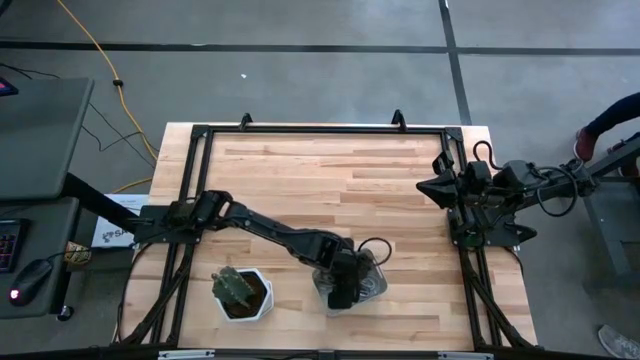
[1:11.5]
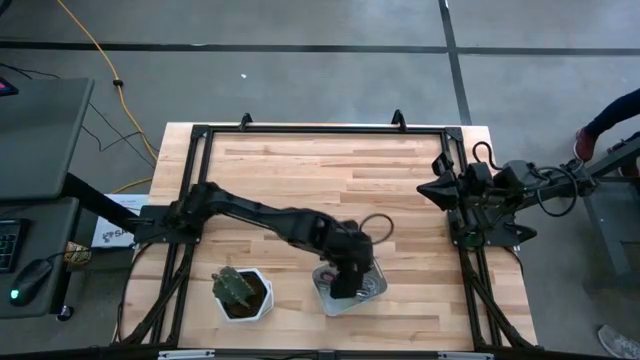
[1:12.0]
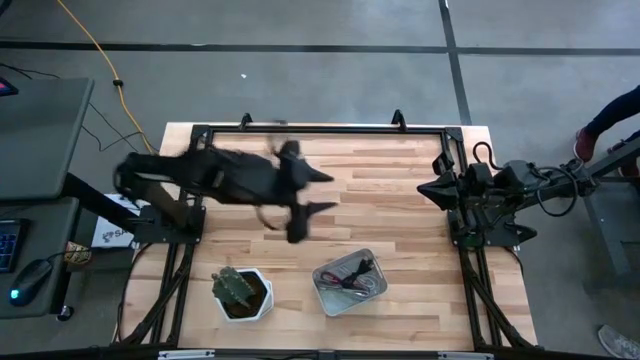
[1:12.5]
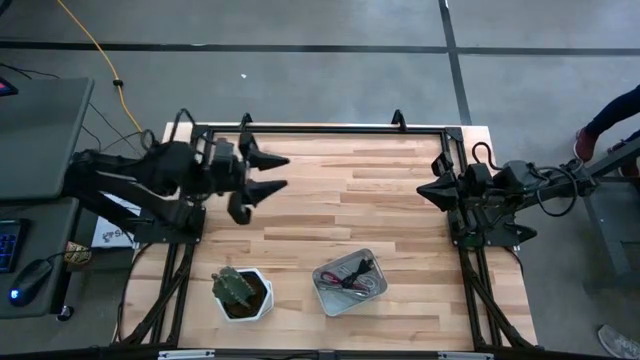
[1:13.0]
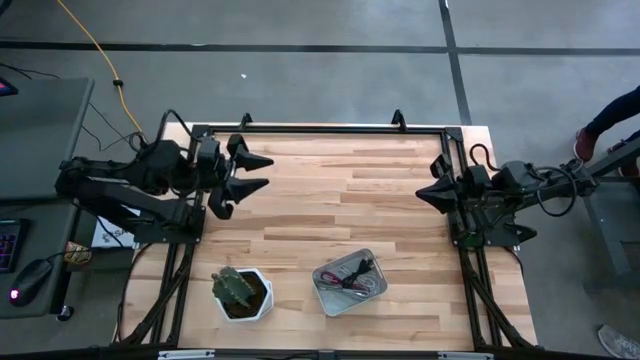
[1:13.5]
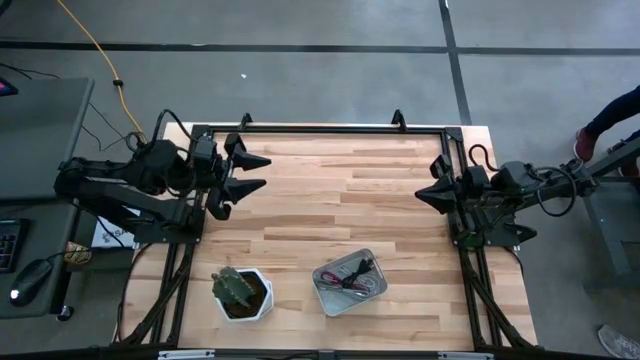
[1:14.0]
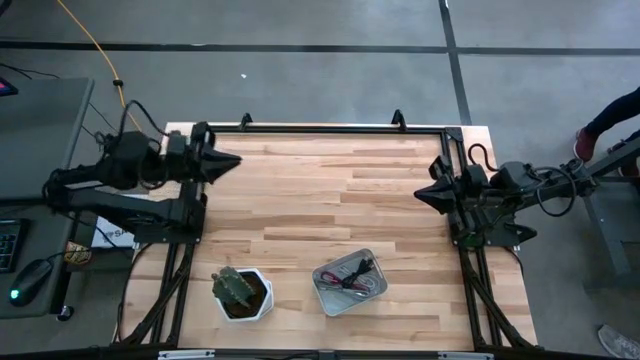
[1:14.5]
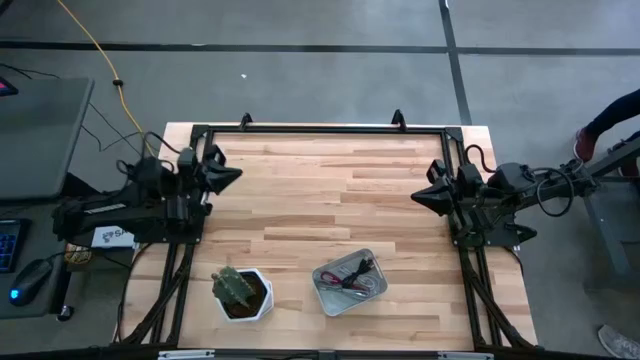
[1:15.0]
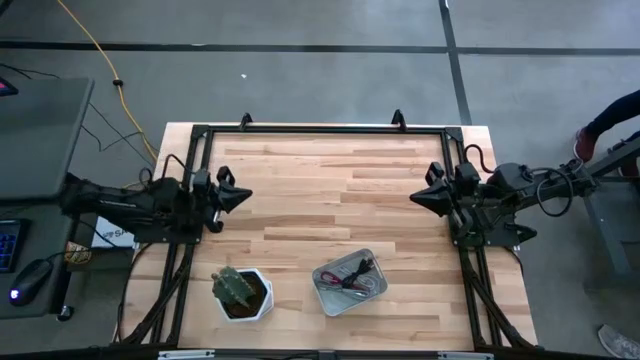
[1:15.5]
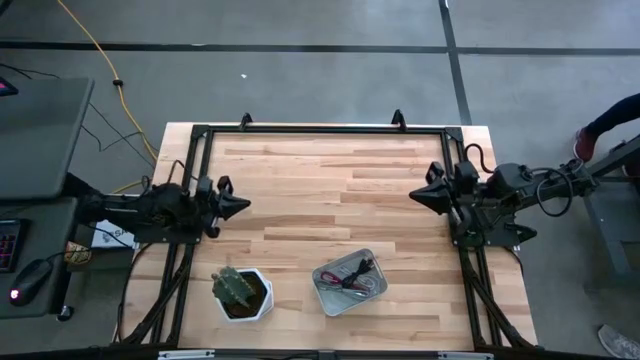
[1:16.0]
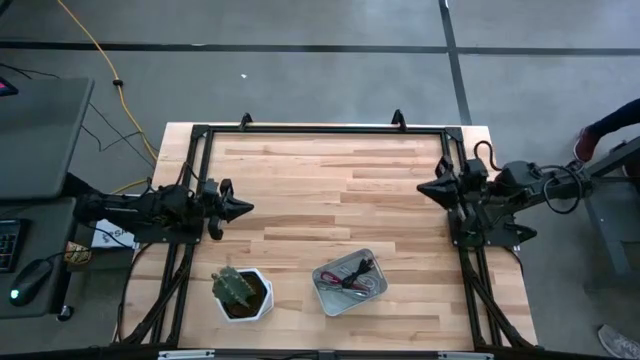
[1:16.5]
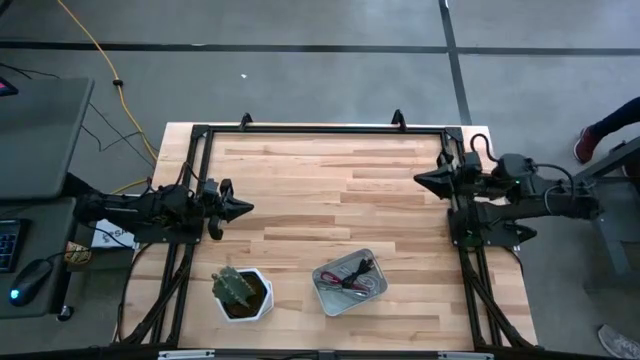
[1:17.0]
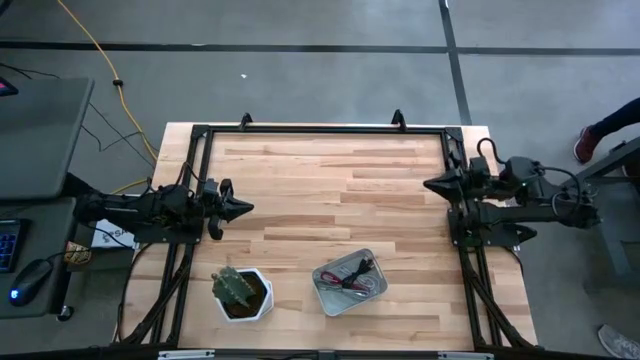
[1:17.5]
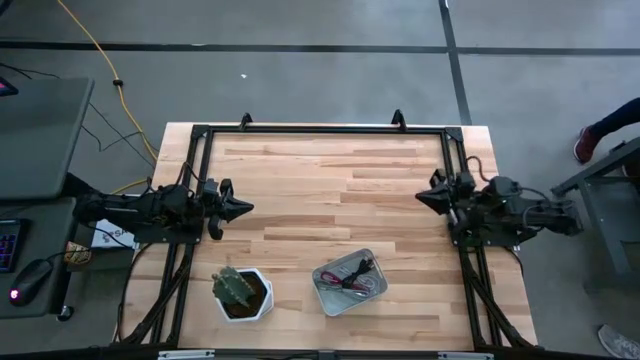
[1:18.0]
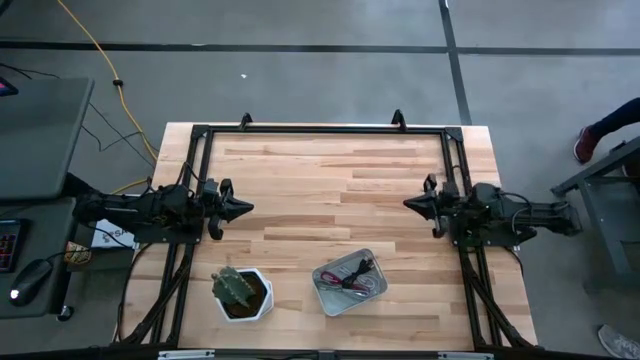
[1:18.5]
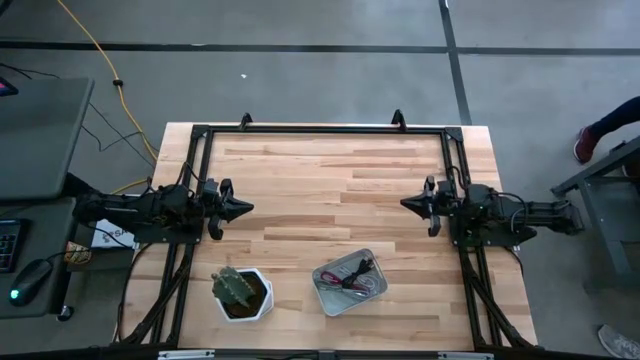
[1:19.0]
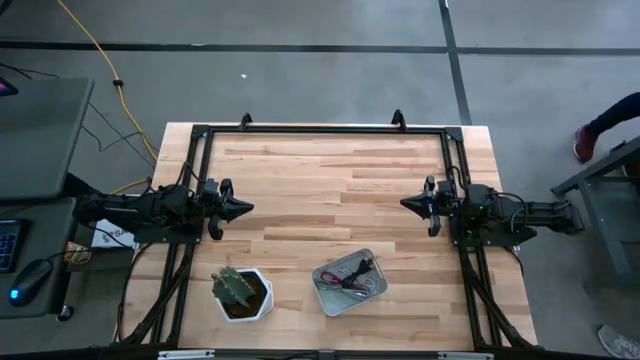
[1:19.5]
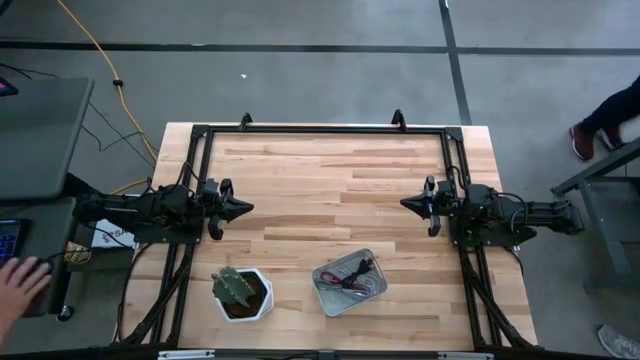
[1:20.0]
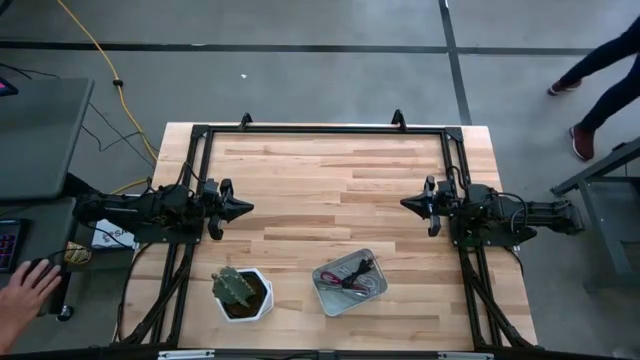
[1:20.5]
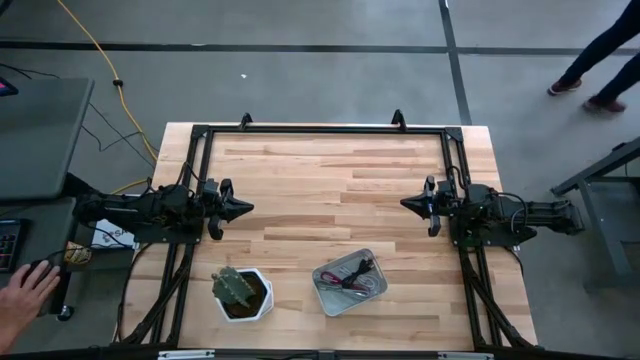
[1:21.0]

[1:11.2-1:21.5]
Task: Pick and place USB-C Cables
Return to Home Position

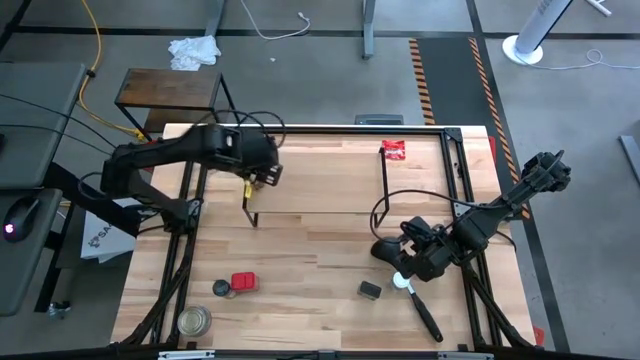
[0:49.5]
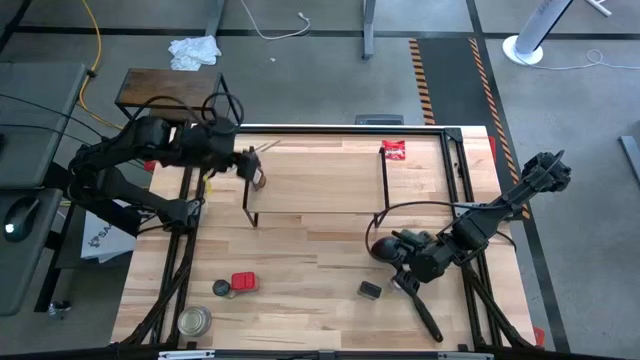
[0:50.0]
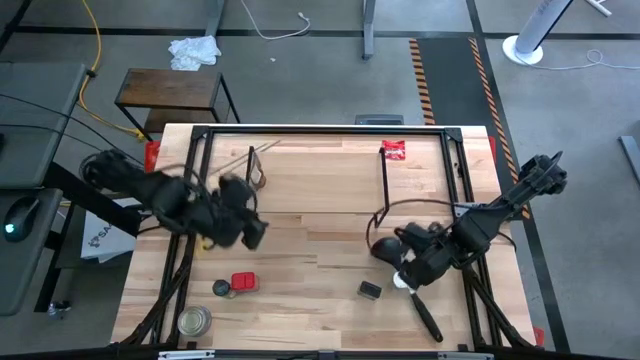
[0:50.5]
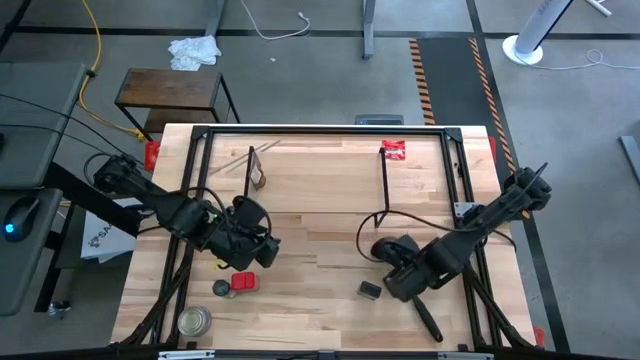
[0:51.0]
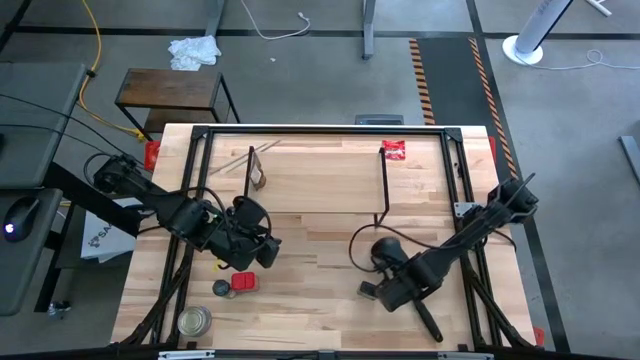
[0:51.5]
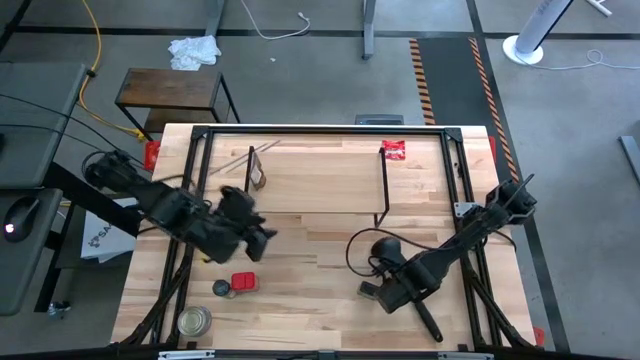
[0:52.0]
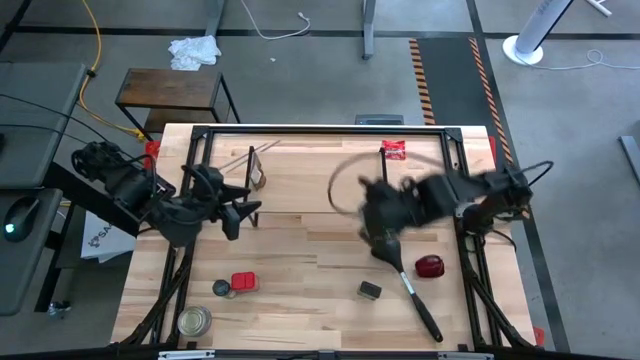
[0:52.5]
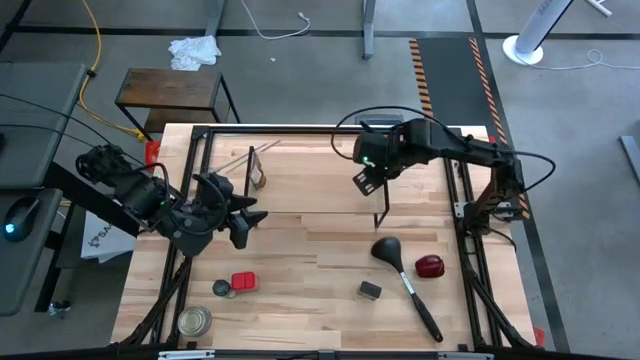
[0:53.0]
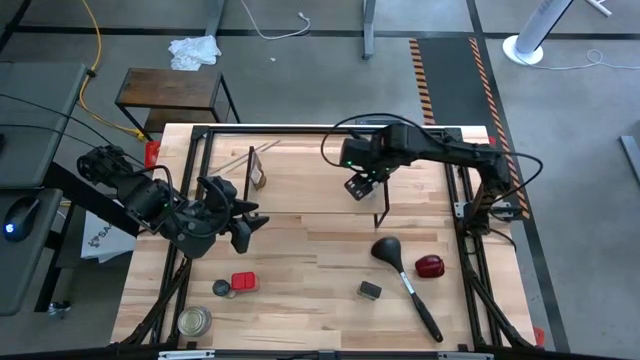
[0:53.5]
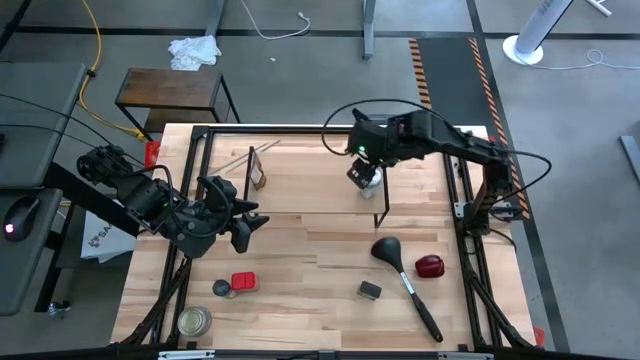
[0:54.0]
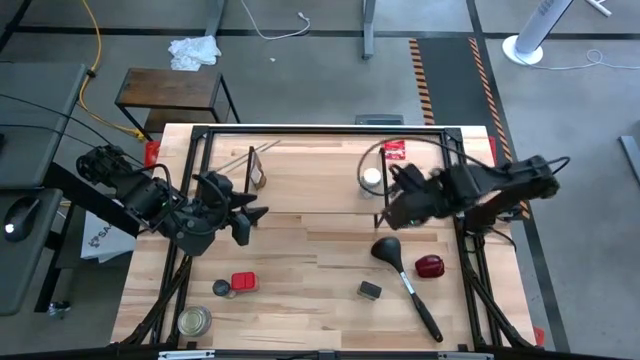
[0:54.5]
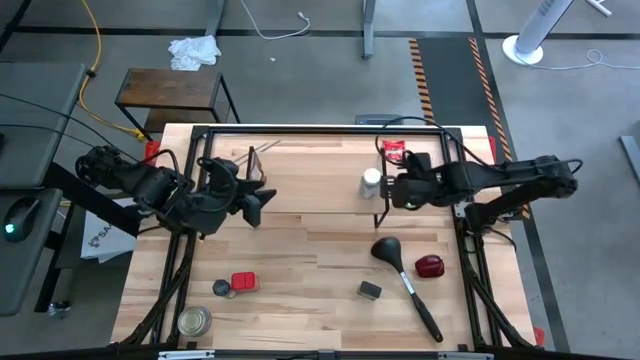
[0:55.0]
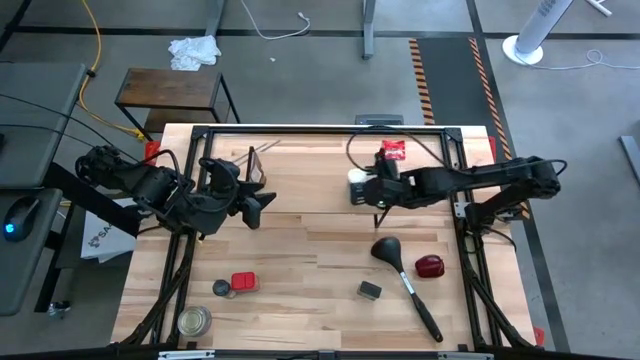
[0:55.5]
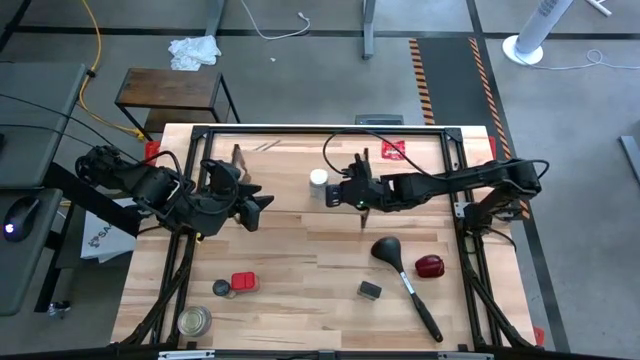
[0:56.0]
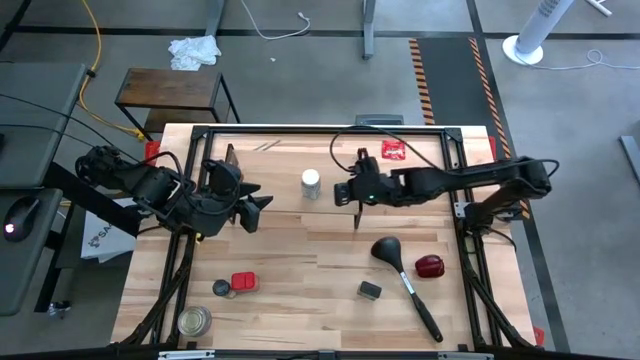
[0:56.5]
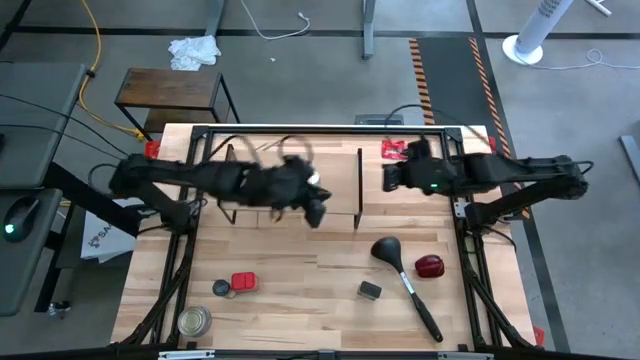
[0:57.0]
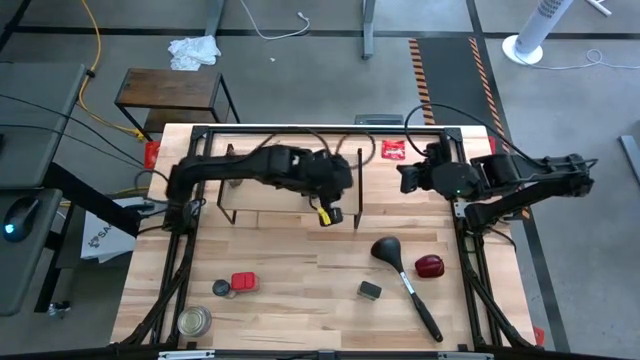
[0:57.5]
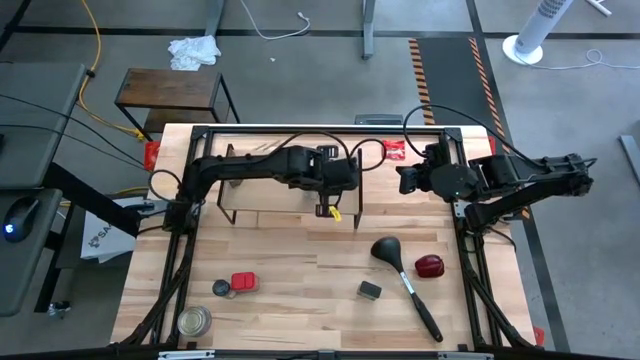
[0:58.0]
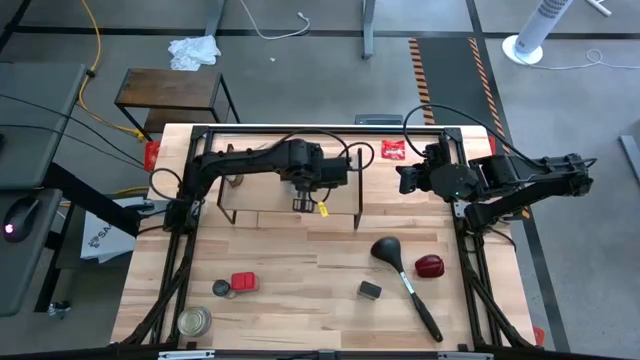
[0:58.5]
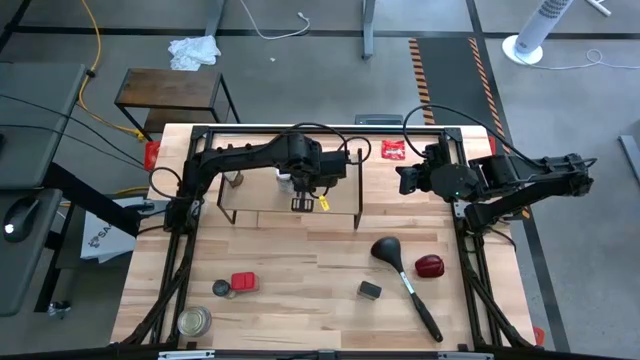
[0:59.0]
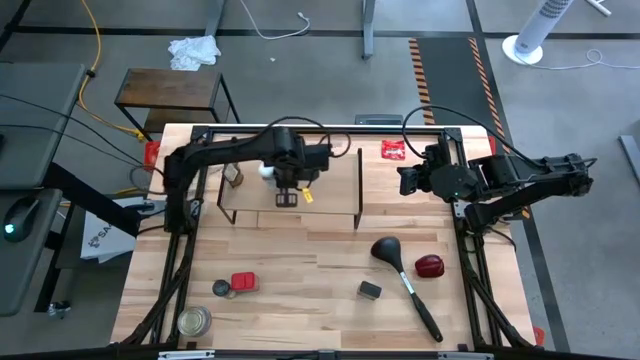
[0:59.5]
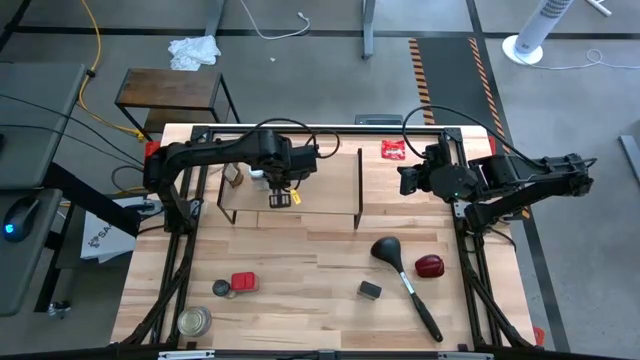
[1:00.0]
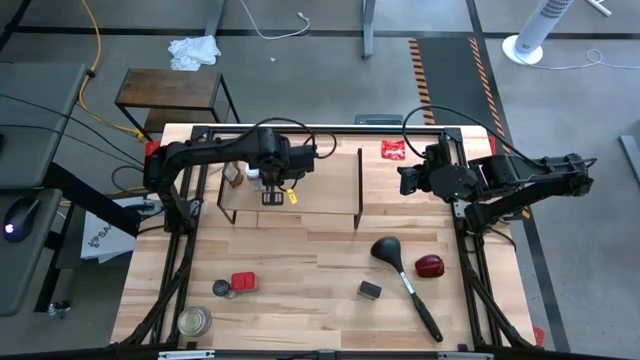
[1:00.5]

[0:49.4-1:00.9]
Task: Shelf spices
Put the white seasoning bottle on the shelf
